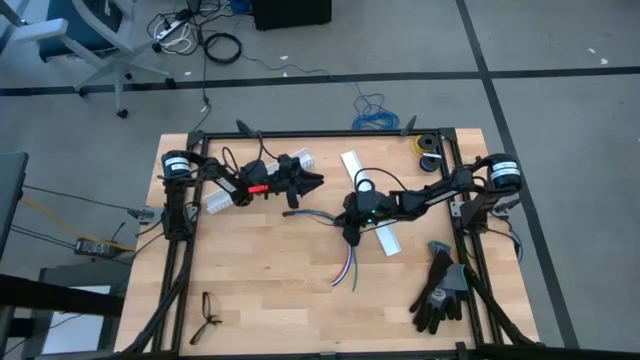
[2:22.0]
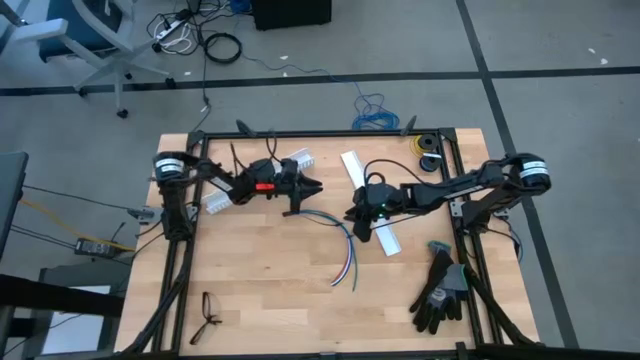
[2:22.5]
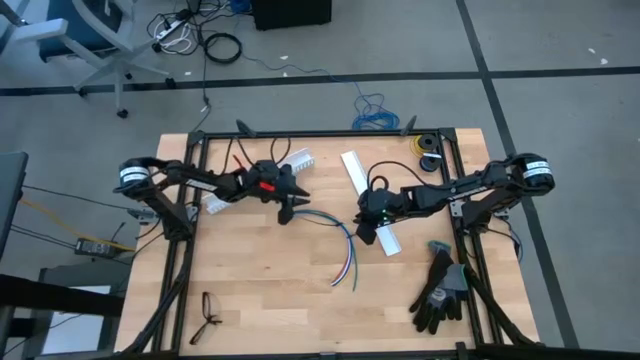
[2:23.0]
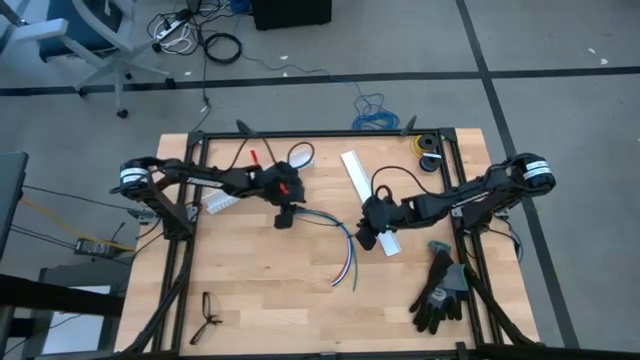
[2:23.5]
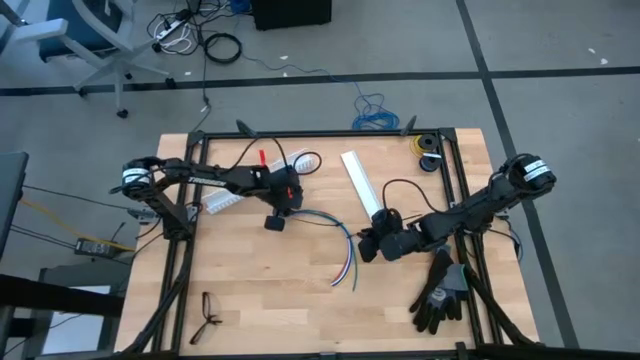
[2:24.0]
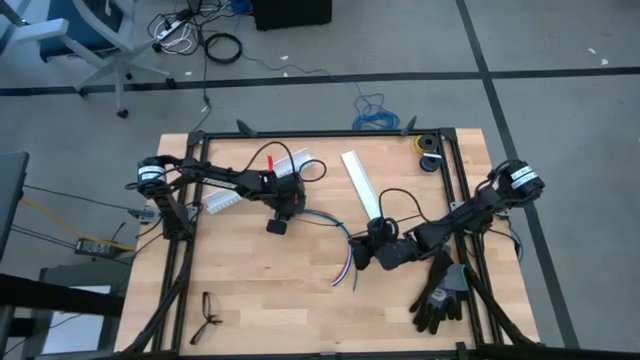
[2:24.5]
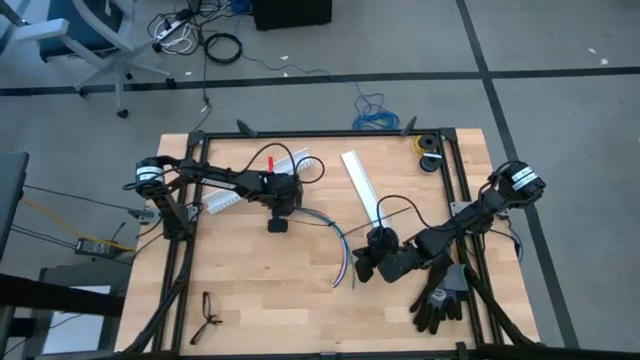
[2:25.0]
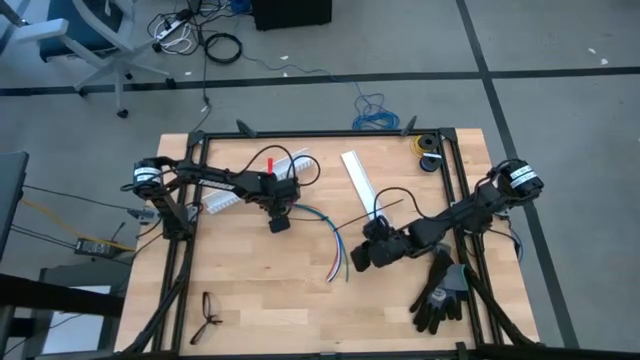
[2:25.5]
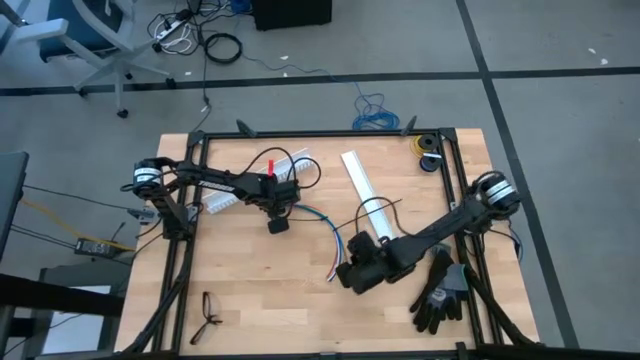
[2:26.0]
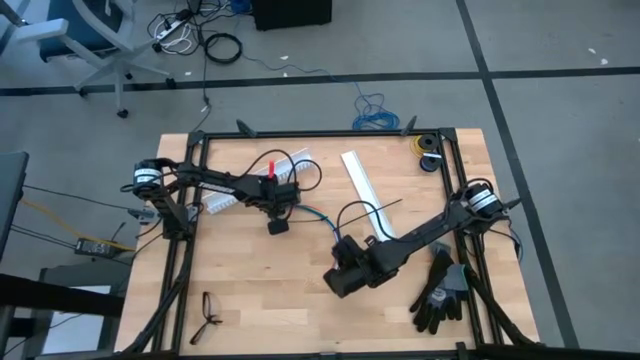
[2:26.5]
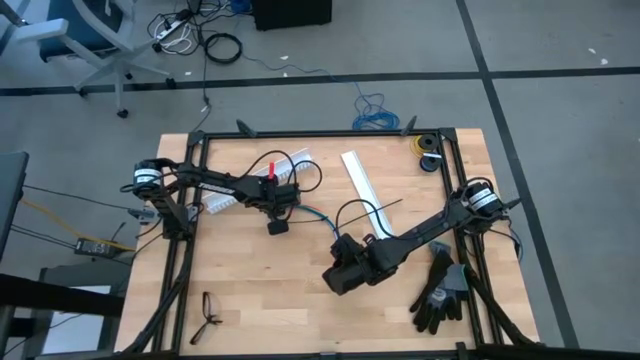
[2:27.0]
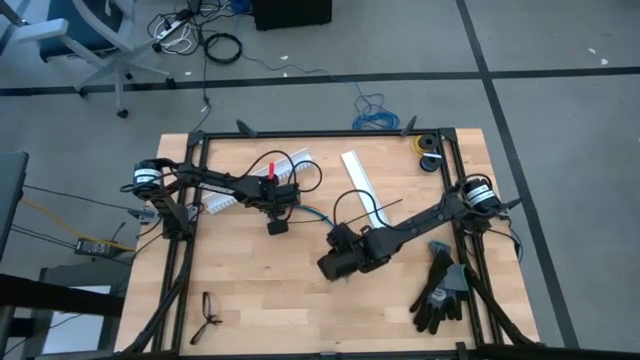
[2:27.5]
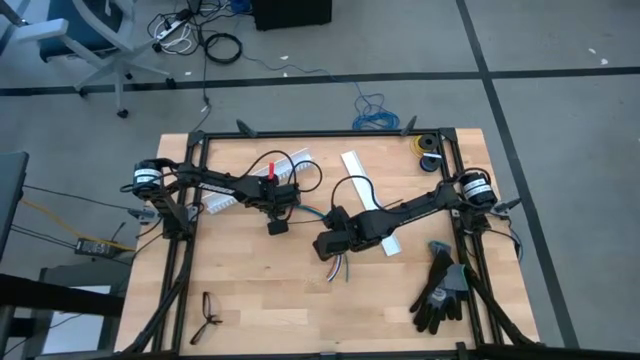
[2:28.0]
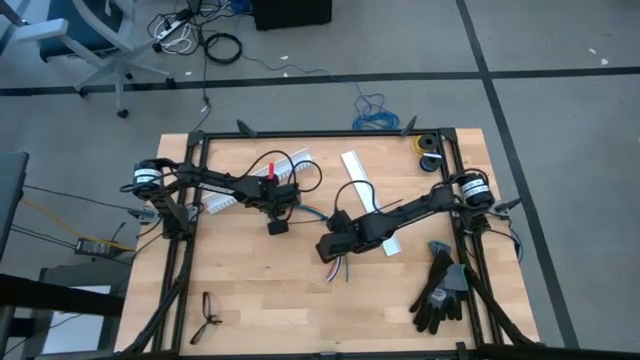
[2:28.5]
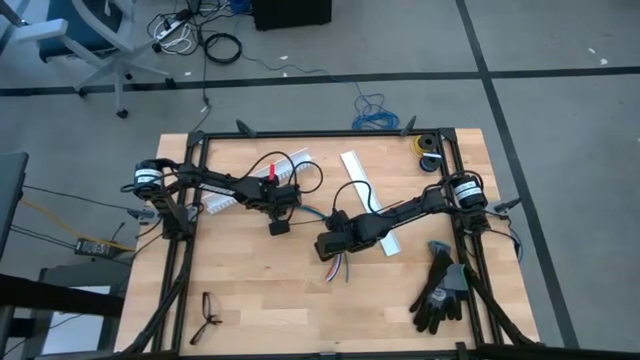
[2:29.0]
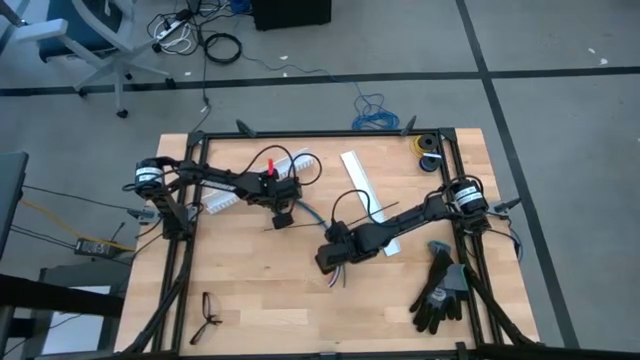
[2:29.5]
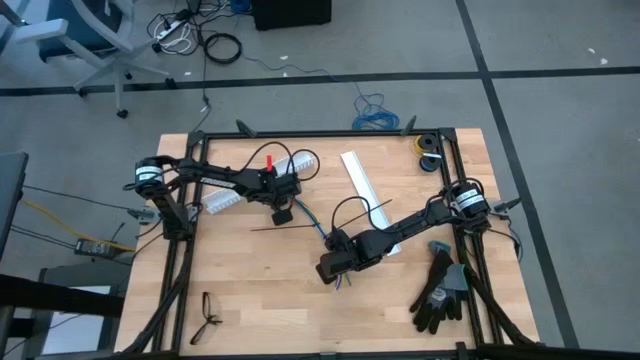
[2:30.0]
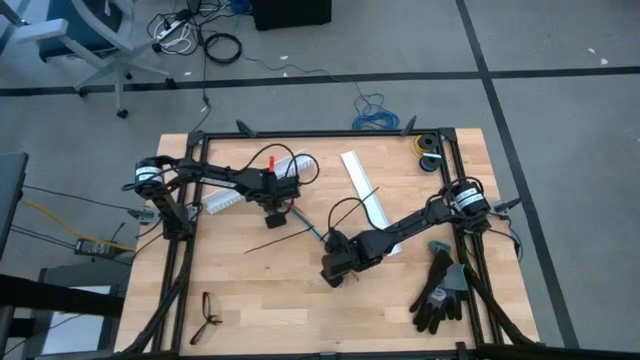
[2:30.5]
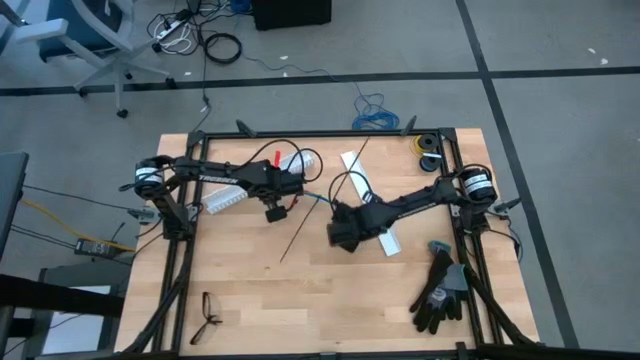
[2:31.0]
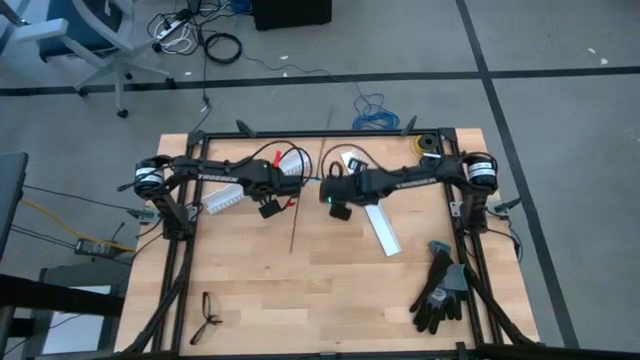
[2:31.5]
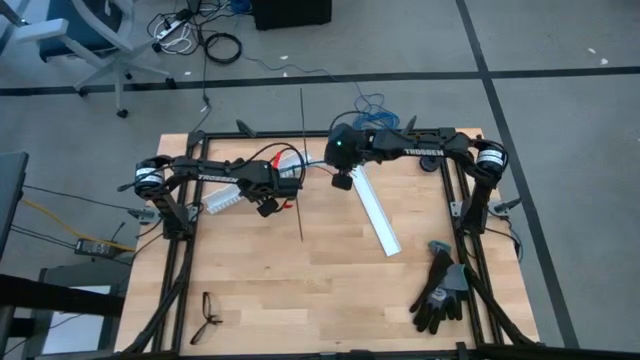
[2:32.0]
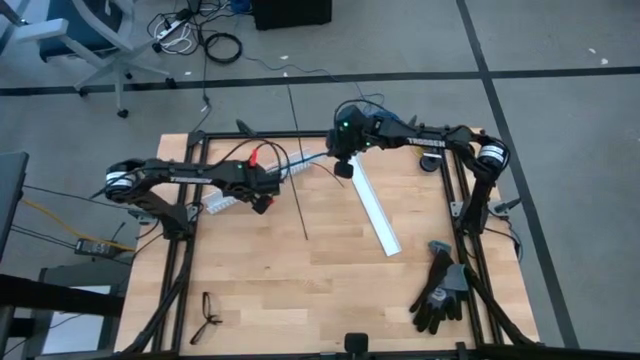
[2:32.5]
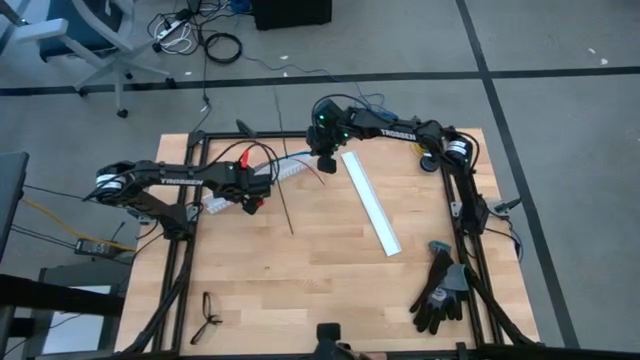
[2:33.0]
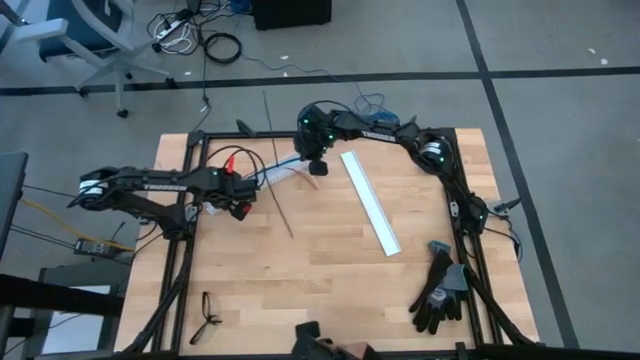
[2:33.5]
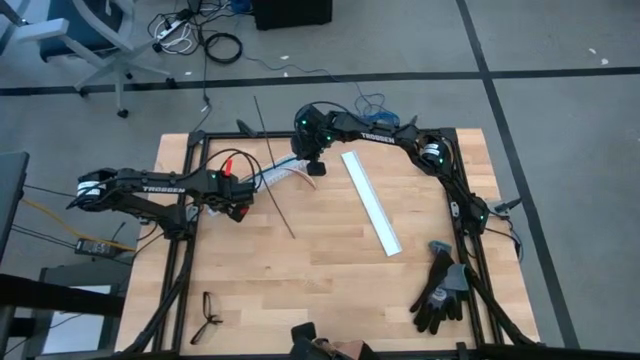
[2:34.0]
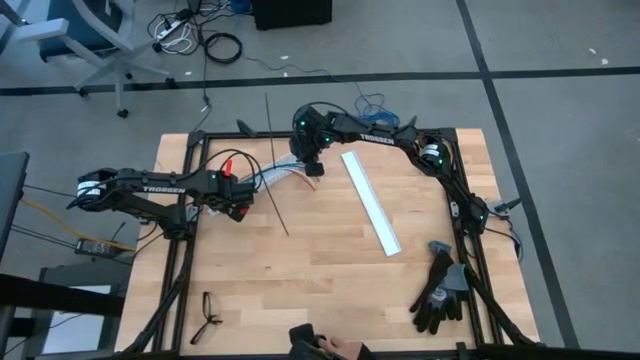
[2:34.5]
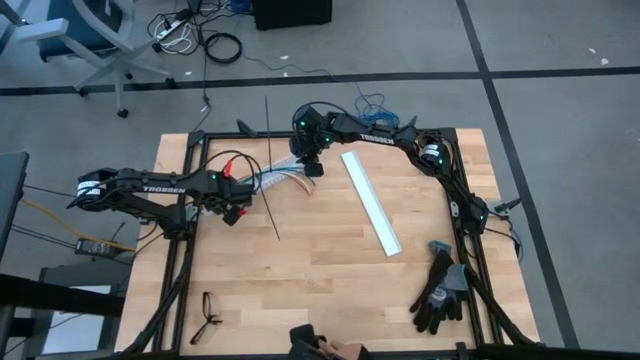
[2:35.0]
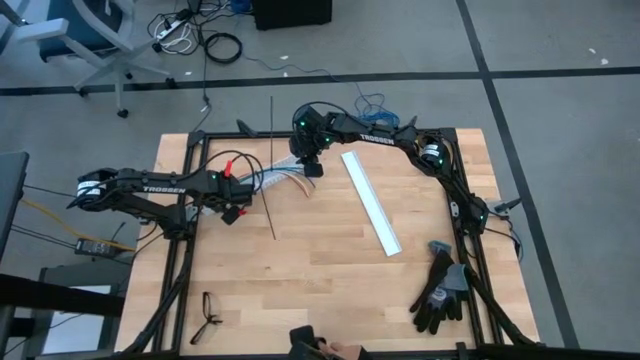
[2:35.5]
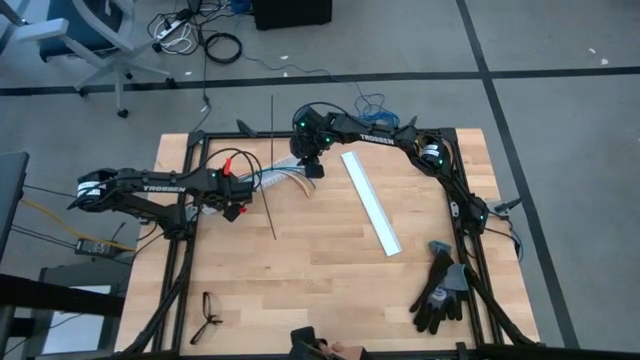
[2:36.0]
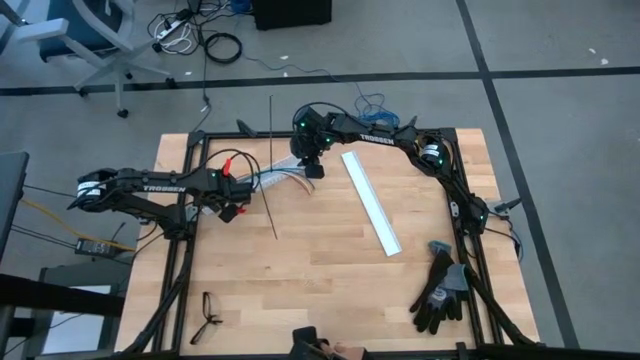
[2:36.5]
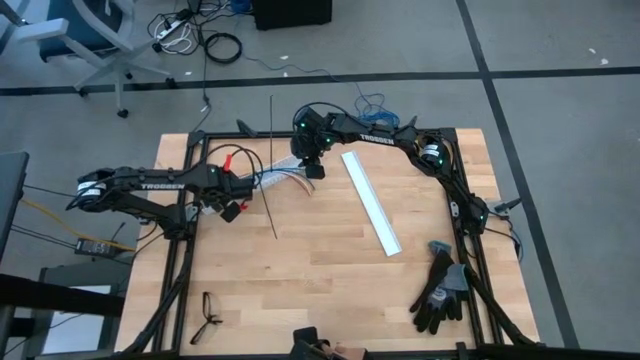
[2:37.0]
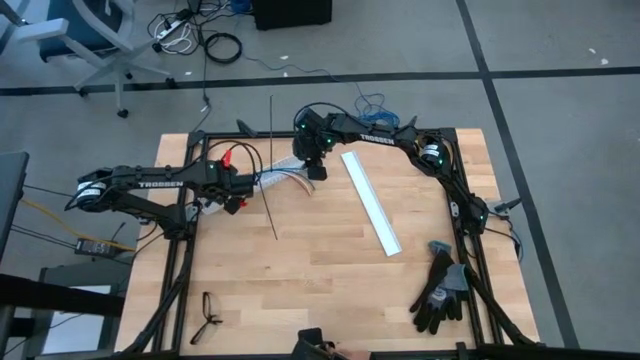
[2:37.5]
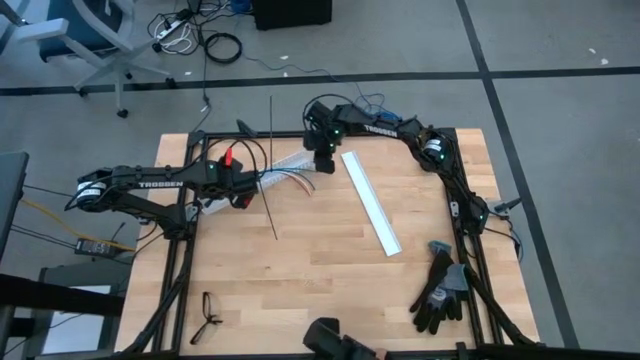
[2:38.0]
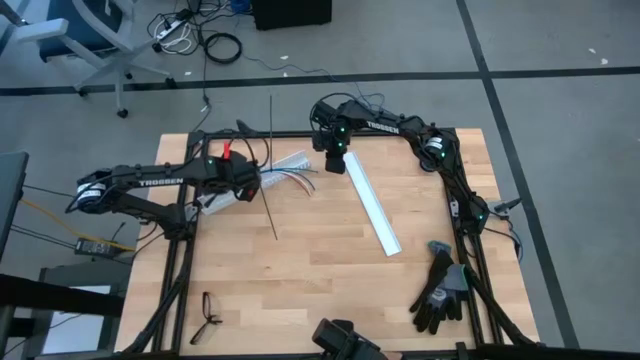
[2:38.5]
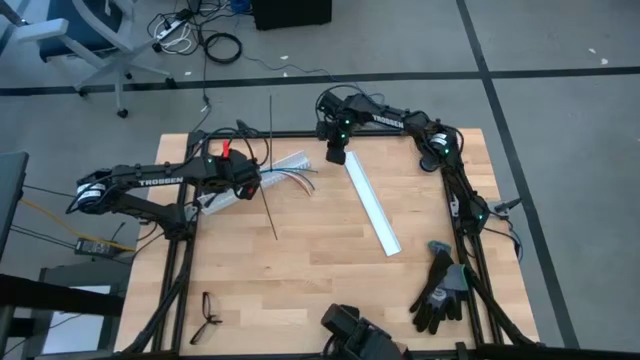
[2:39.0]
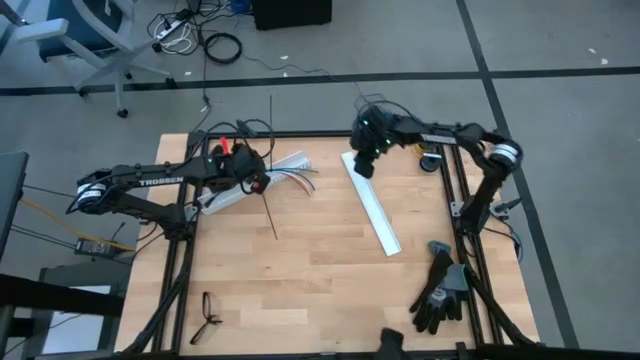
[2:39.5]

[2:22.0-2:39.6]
Task: Ziptie cables
Put the ziptied cables into the white cable duct
